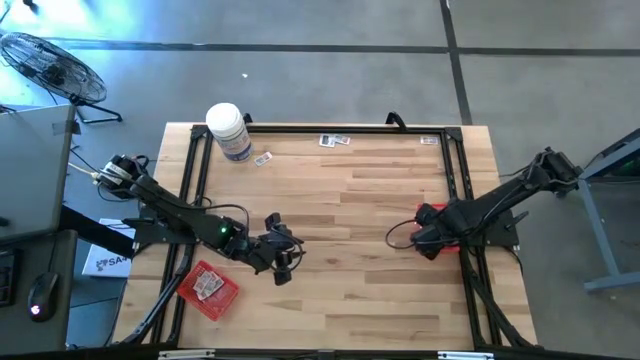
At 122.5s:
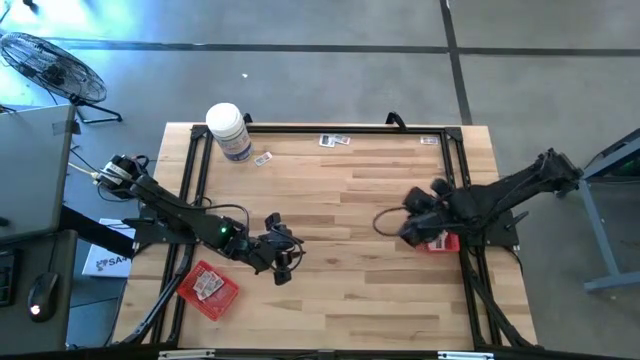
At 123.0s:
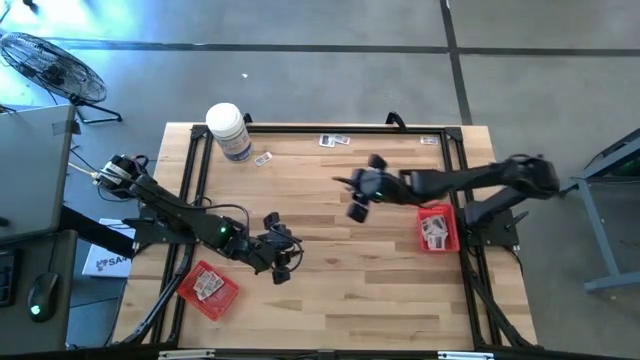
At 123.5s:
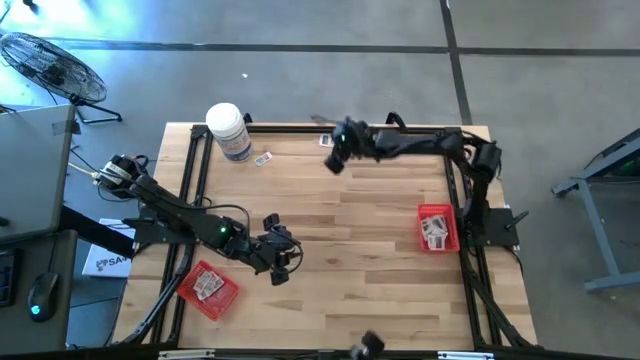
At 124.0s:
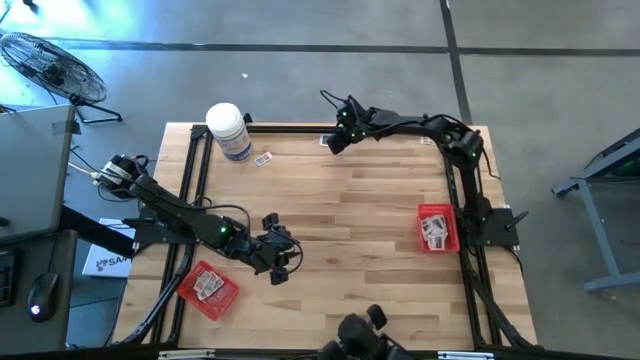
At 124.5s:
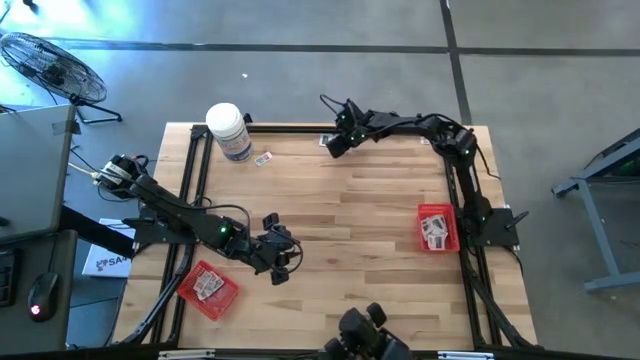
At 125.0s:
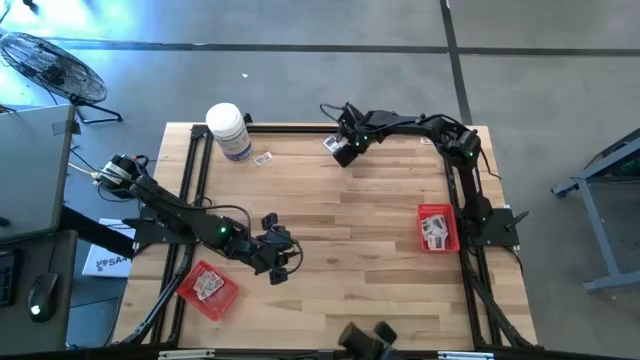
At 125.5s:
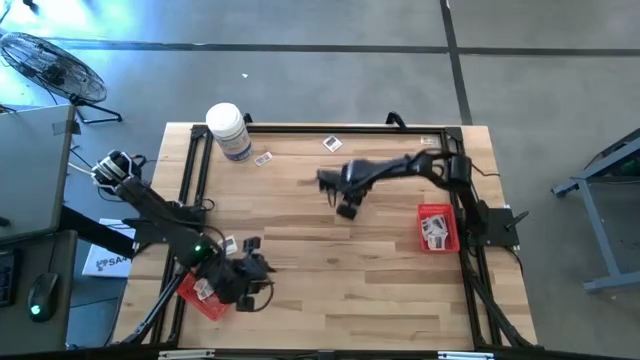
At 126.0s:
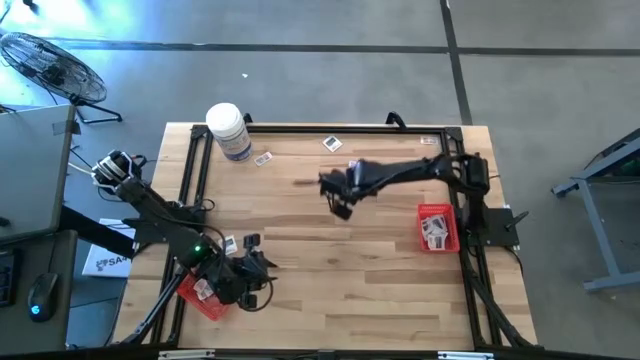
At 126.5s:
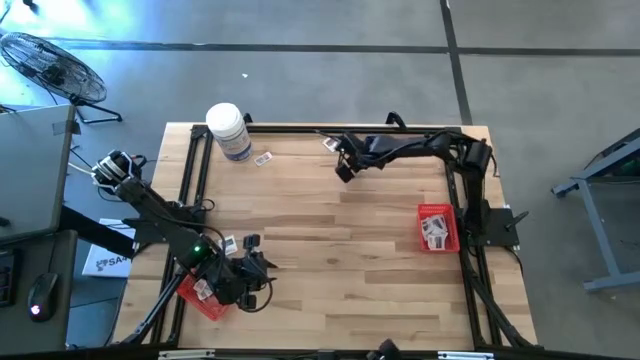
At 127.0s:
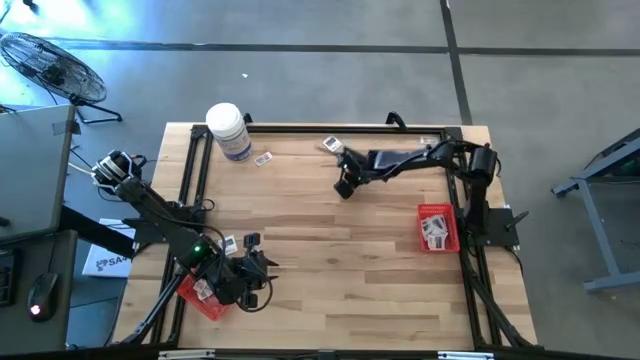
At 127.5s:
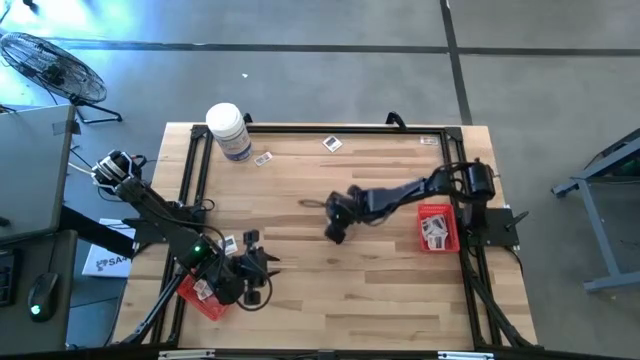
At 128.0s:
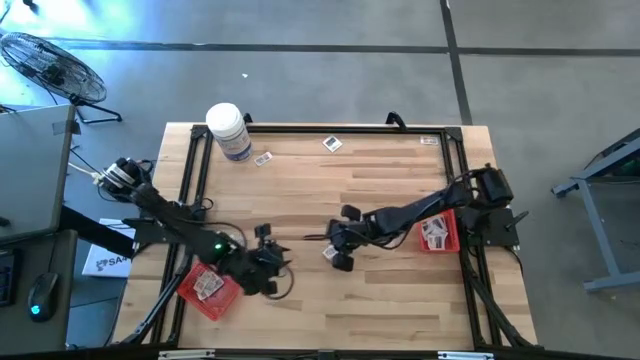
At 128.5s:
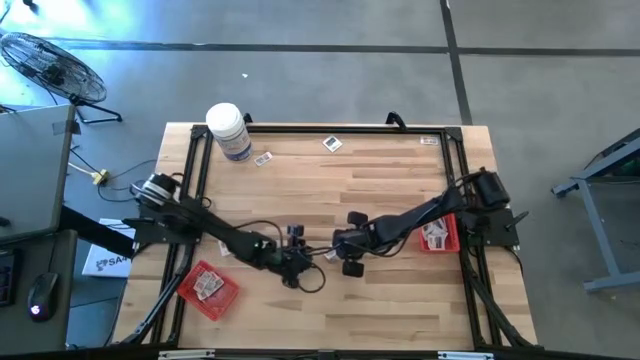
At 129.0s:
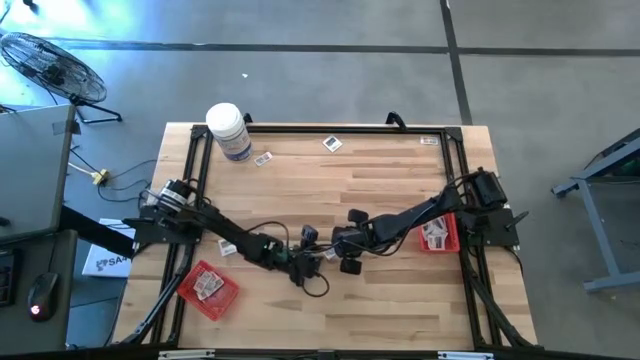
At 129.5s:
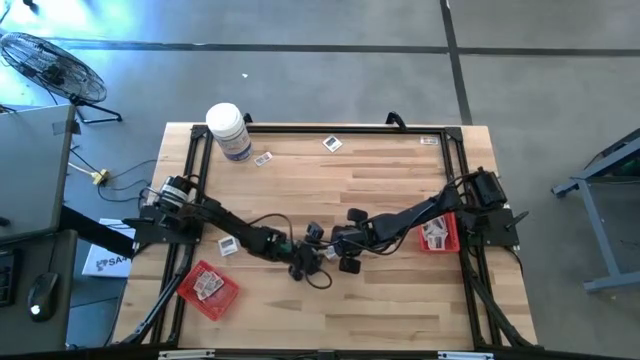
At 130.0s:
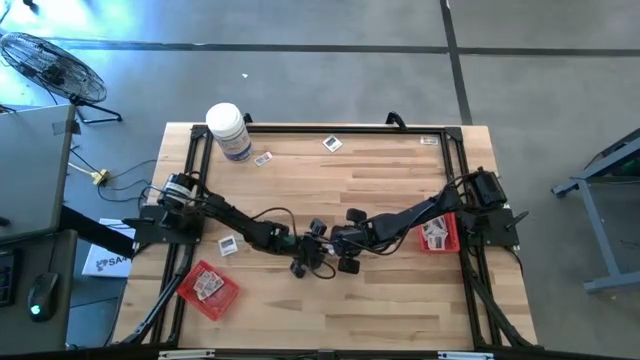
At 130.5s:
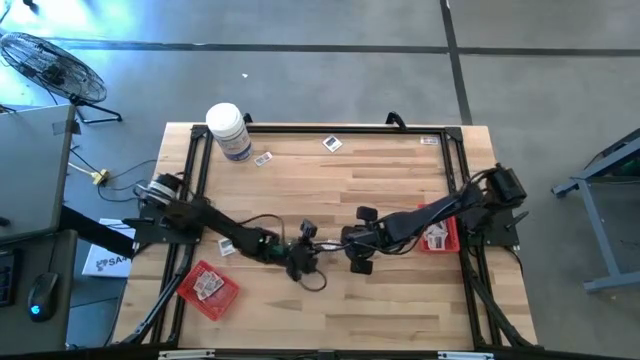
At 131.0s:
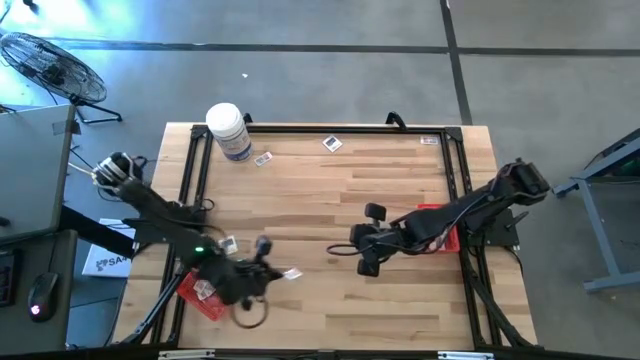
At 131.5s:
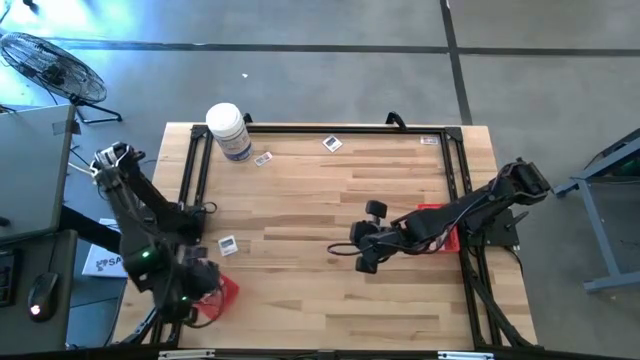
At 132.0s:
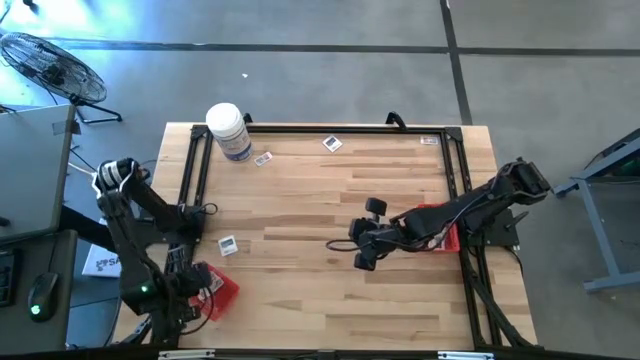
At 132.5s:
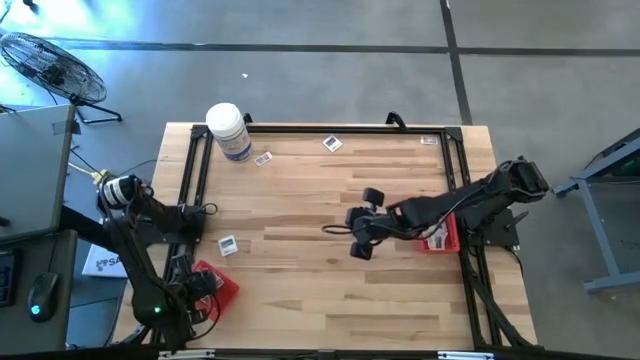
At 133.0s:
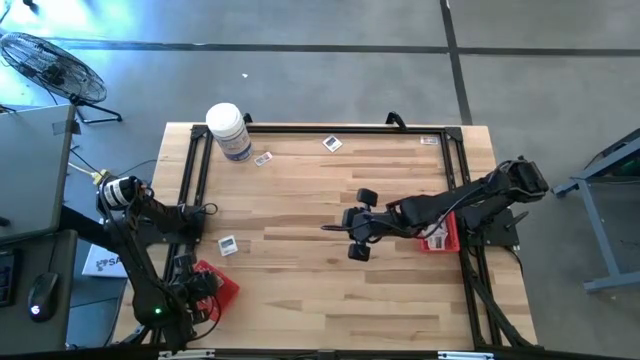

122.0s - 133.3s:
Task: Pick & Place First Aid Supplies
Put the ointment pack into the left red bin

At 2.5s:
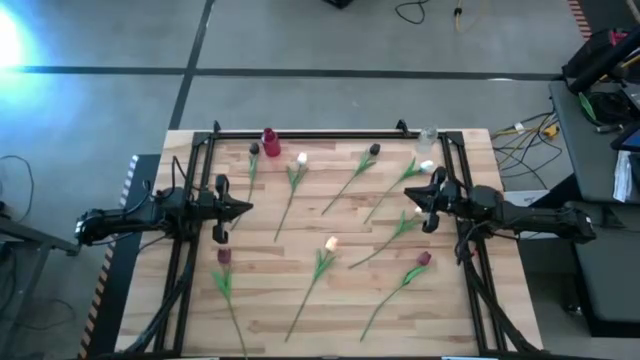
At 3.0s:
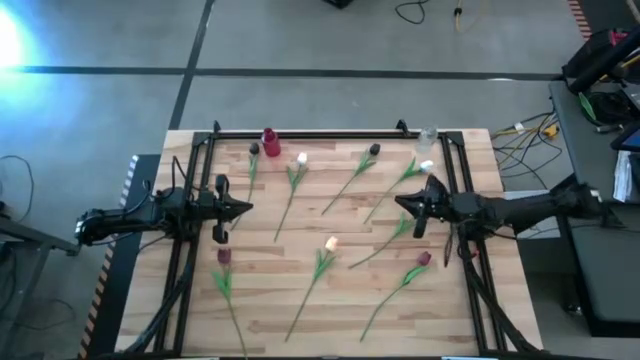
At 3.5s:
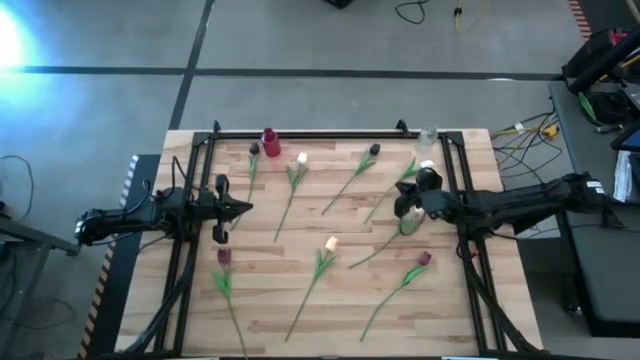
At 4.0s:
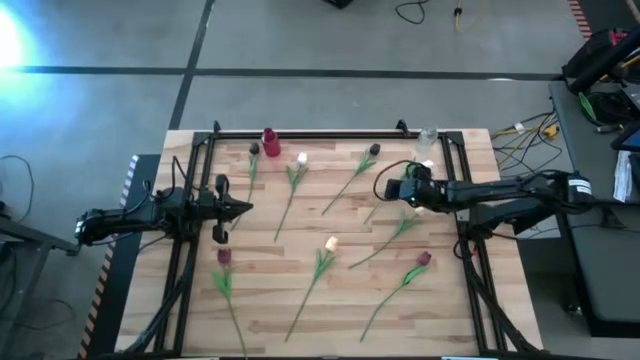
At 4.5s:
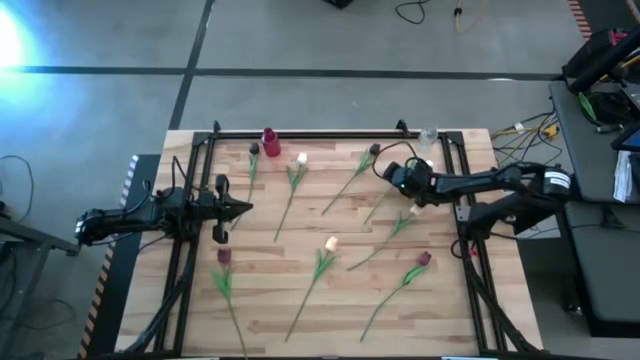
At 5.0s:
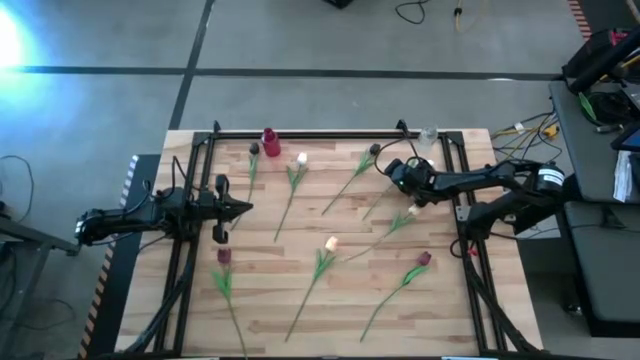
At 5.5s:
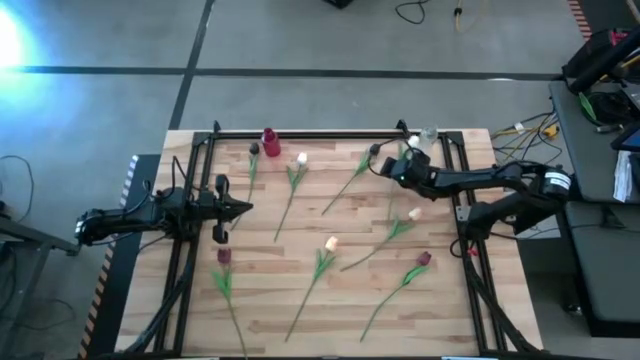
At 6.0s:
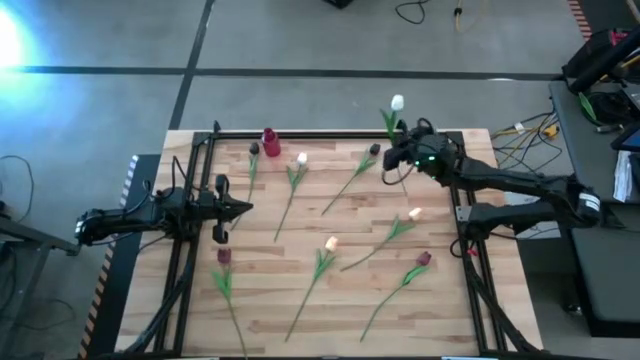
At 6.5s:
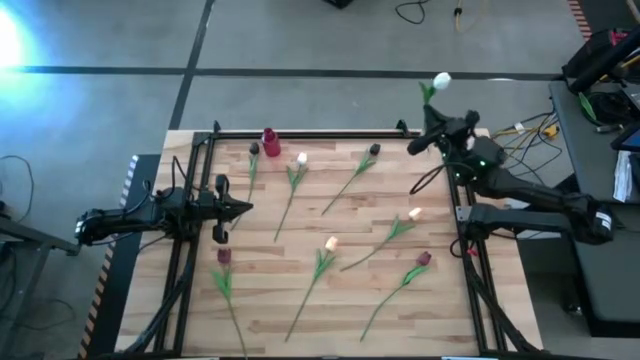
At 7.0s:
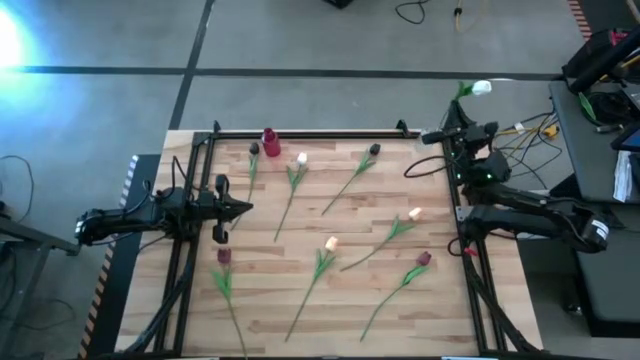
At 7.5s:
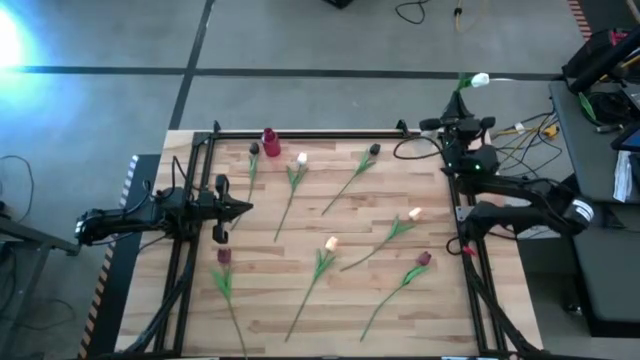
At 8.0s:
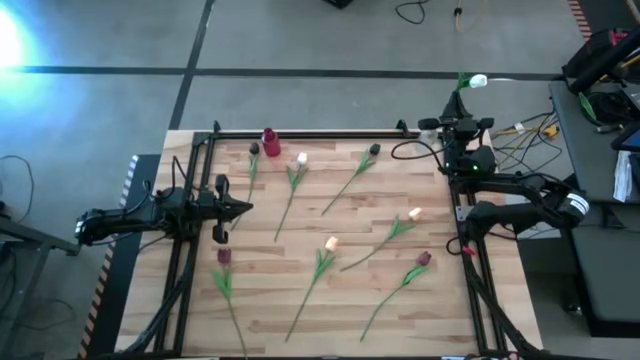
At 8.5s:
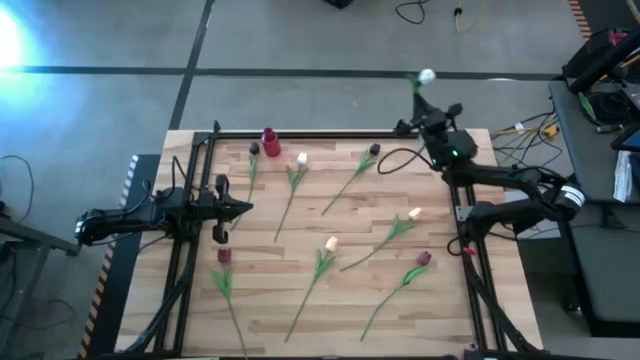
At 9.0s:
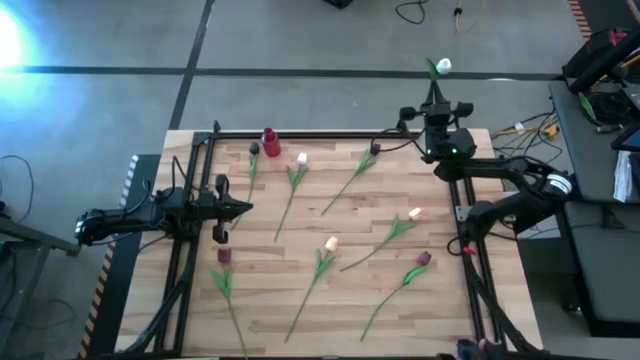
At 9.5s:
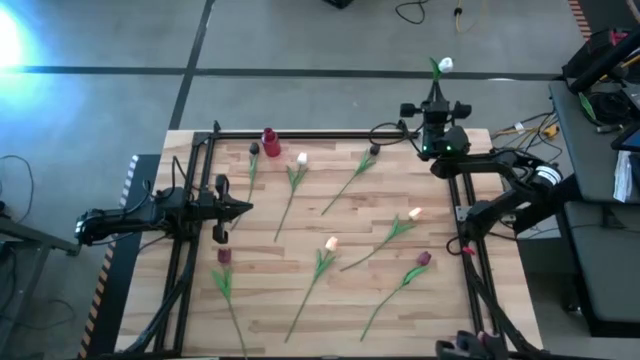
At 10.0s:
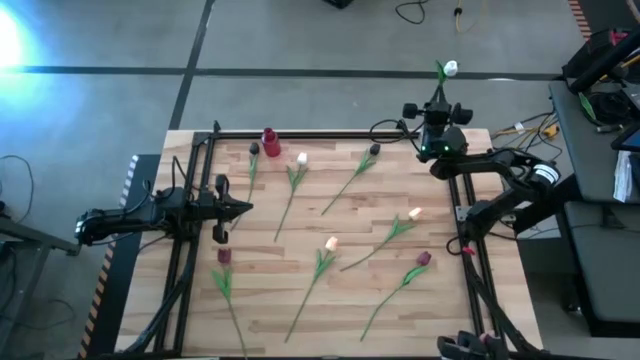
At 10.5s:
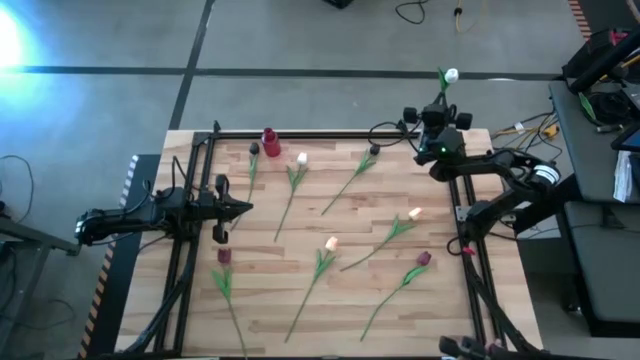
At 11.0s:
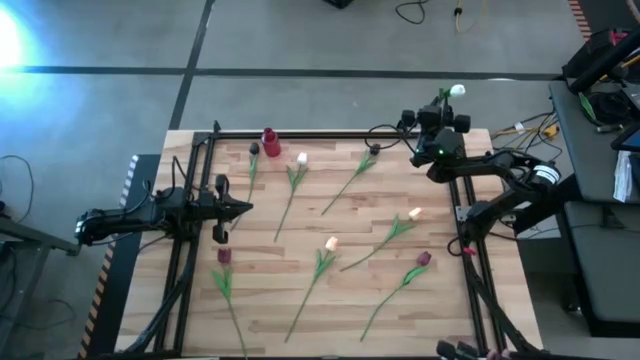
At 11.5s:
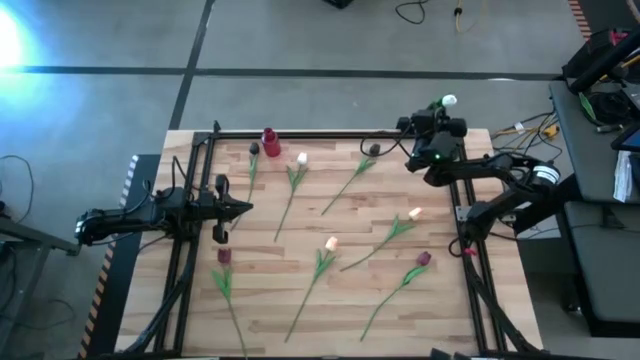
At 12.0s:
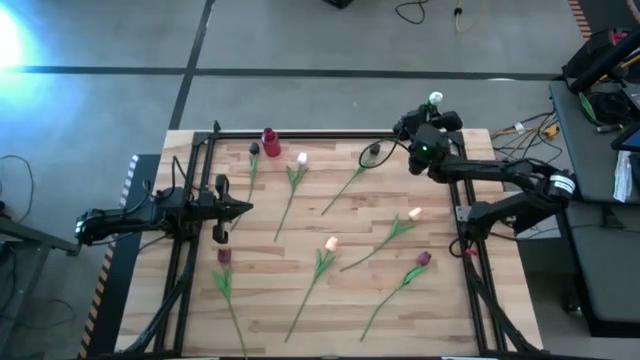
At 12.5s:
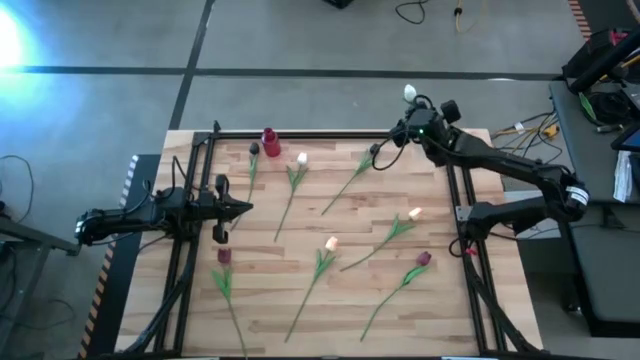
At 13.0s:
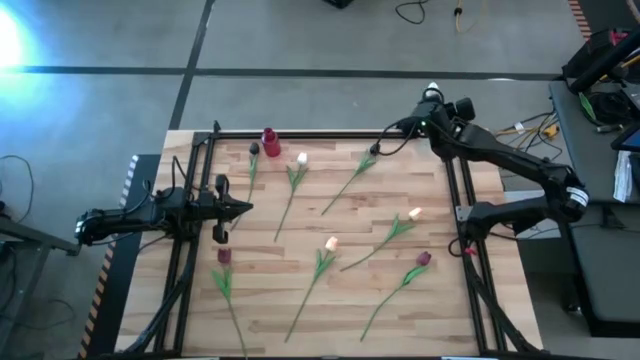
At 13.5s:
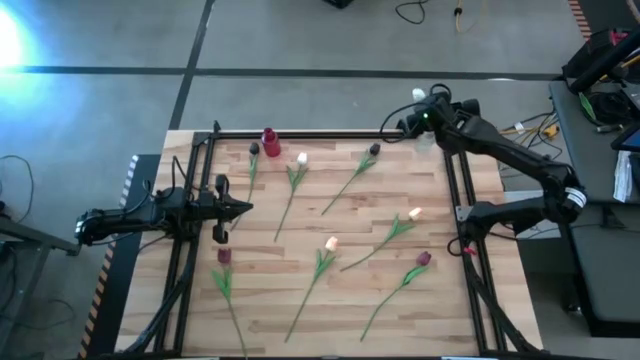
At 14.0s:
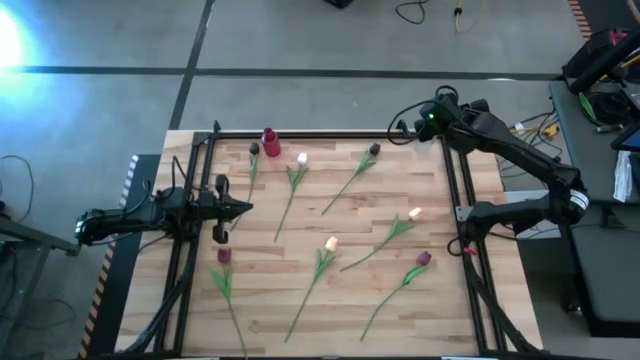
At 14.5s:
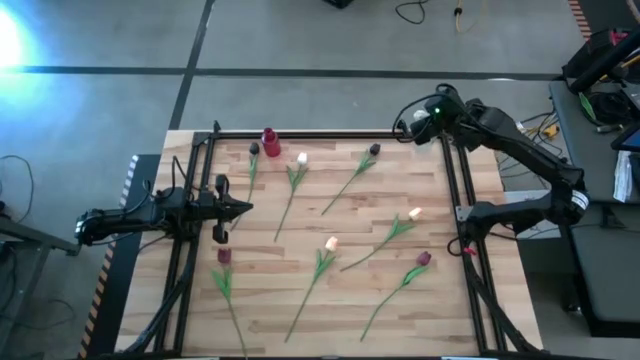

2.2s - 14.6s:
Task: Sort flowers into vase by color
Put the right white tulip into the transparent vase
